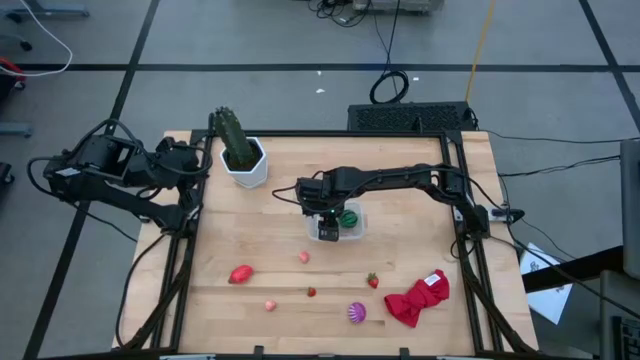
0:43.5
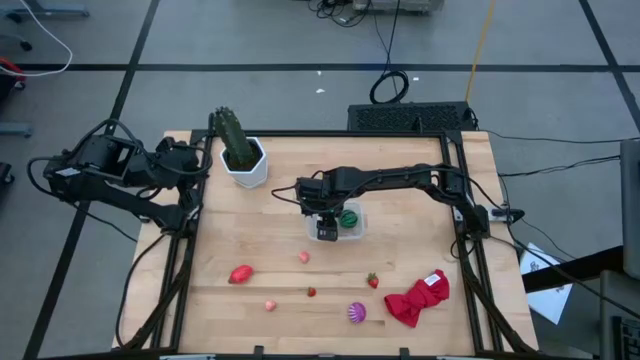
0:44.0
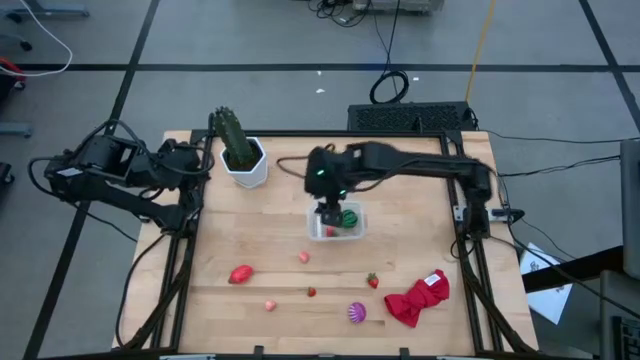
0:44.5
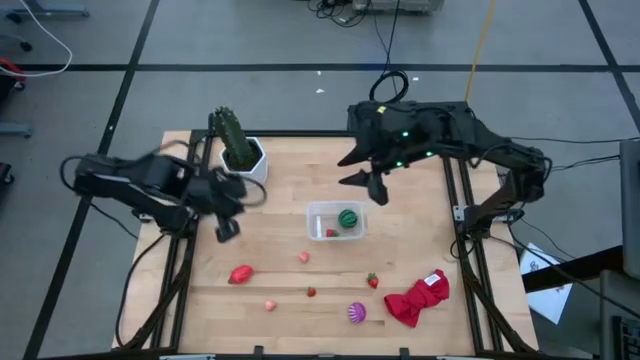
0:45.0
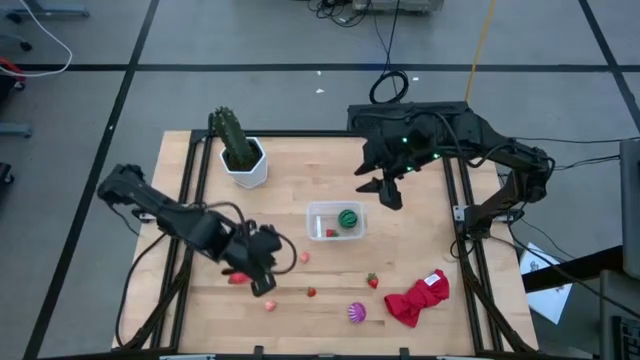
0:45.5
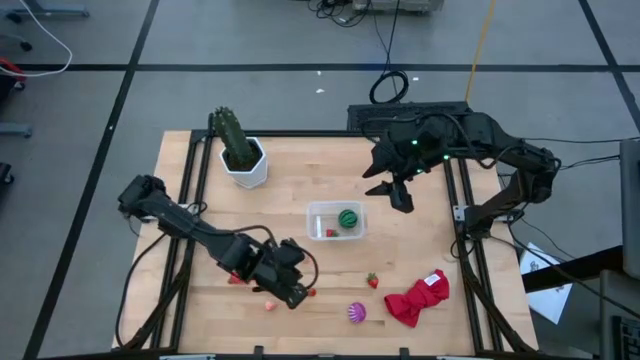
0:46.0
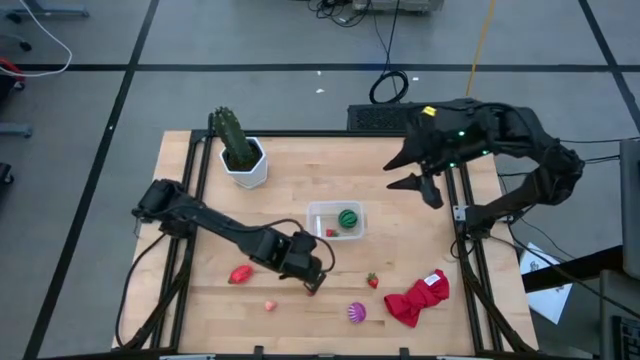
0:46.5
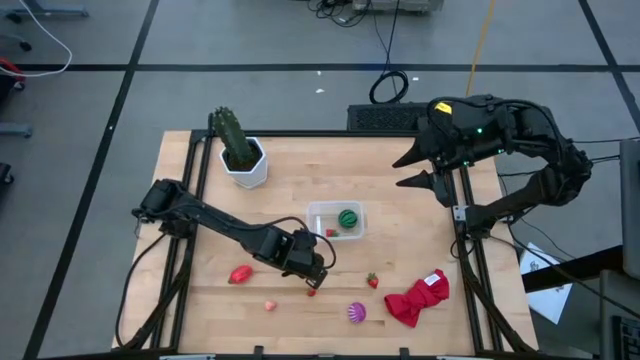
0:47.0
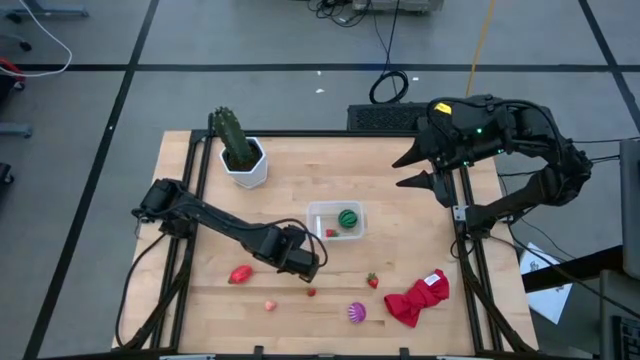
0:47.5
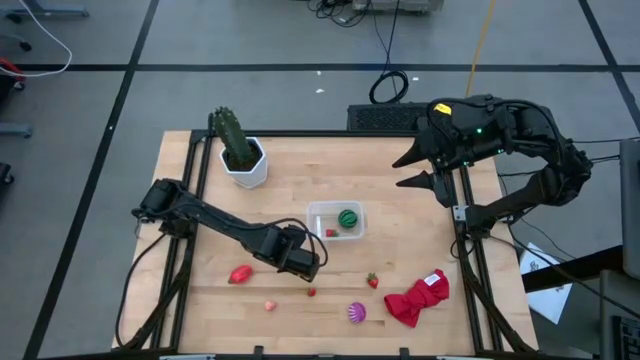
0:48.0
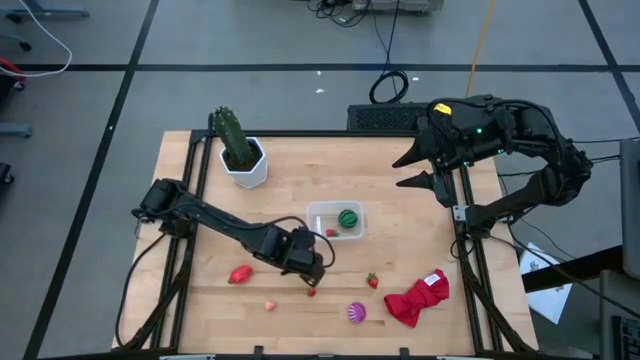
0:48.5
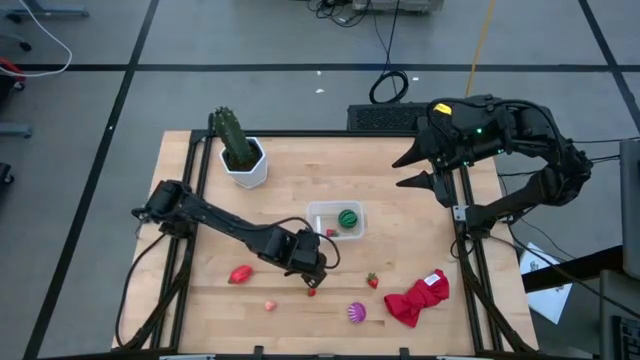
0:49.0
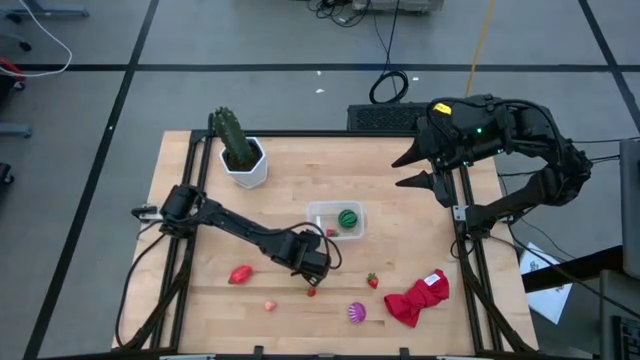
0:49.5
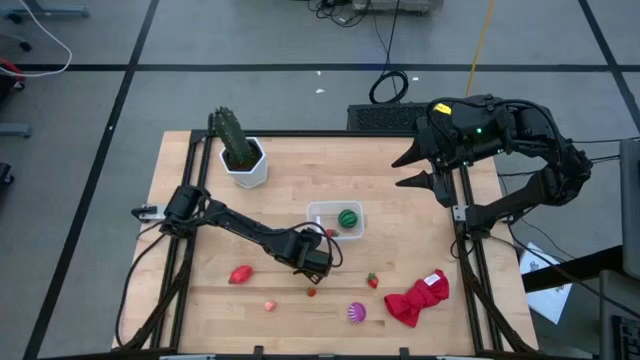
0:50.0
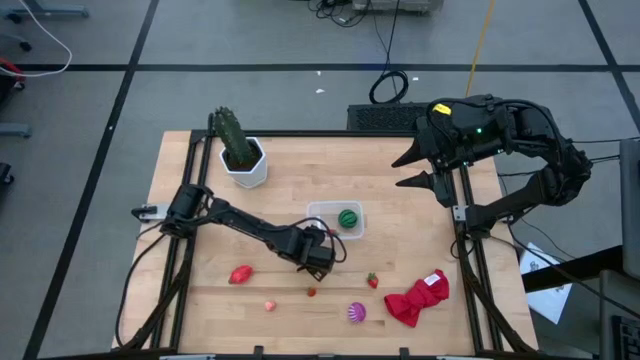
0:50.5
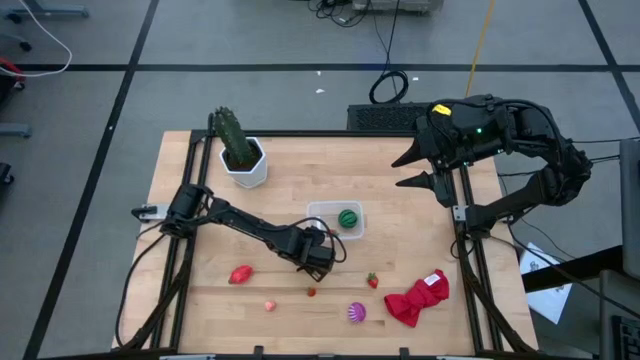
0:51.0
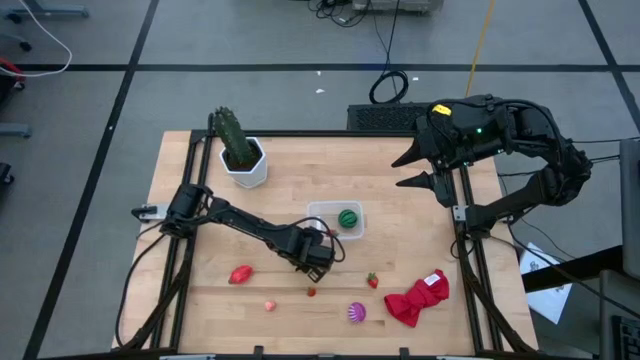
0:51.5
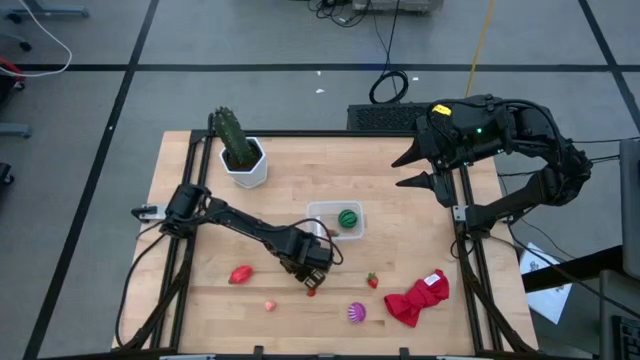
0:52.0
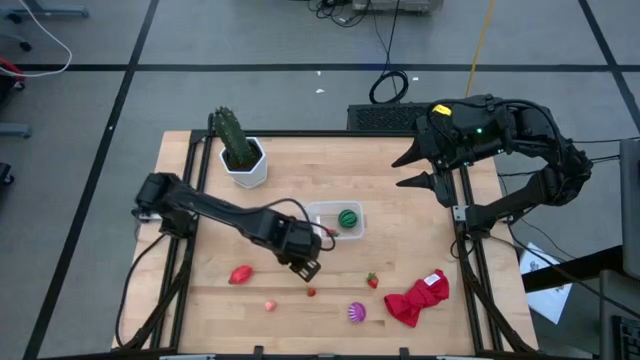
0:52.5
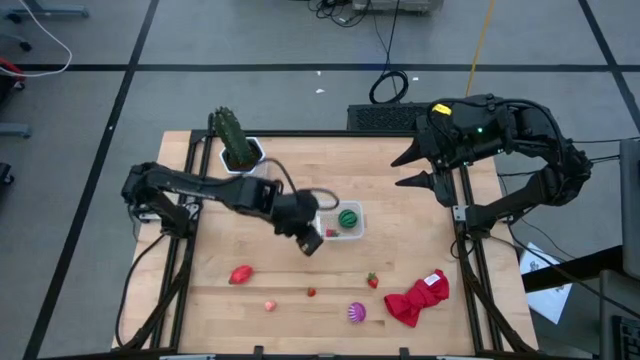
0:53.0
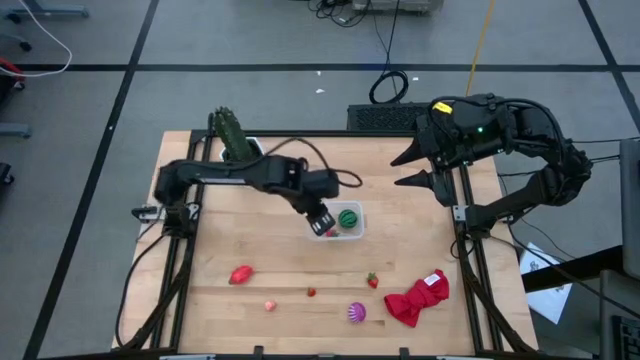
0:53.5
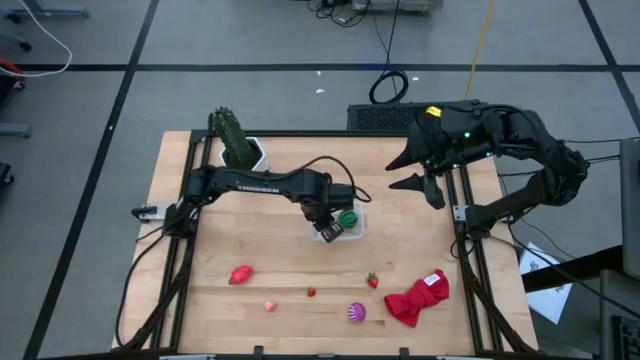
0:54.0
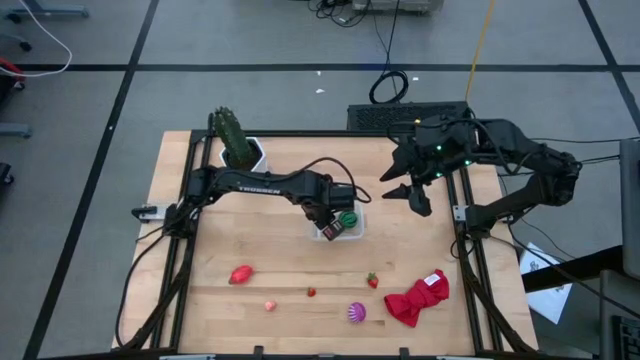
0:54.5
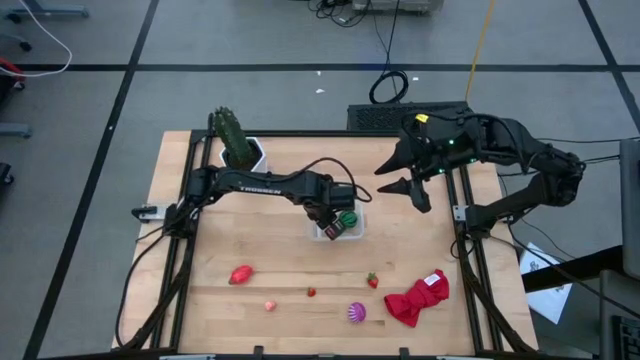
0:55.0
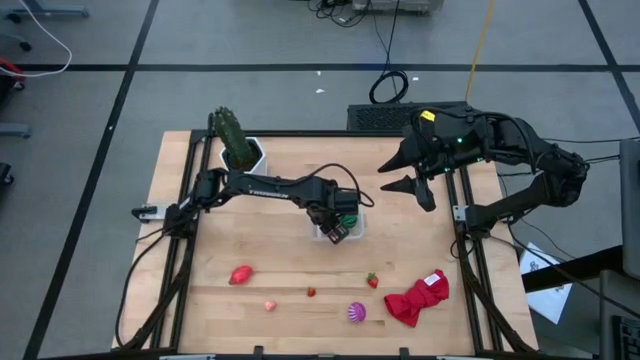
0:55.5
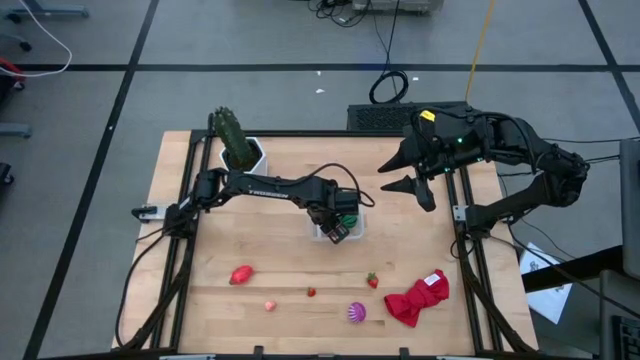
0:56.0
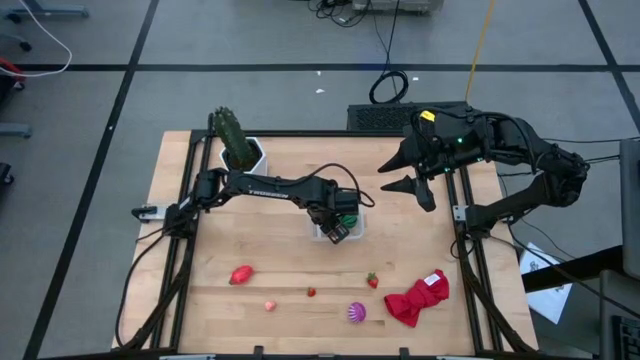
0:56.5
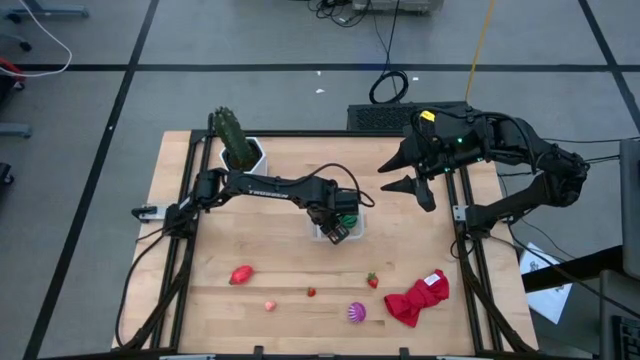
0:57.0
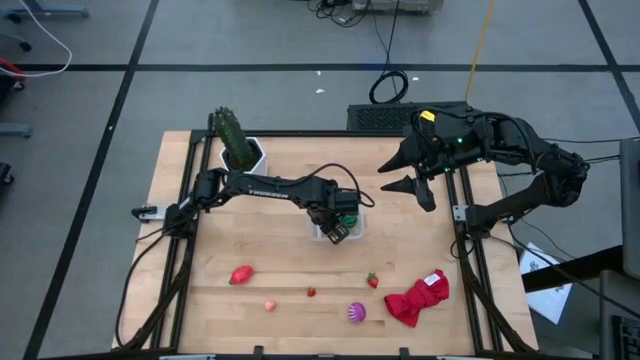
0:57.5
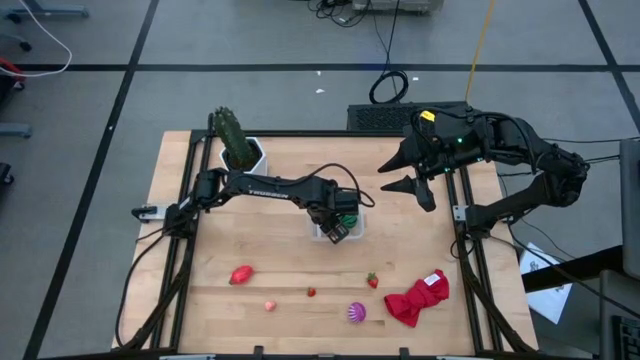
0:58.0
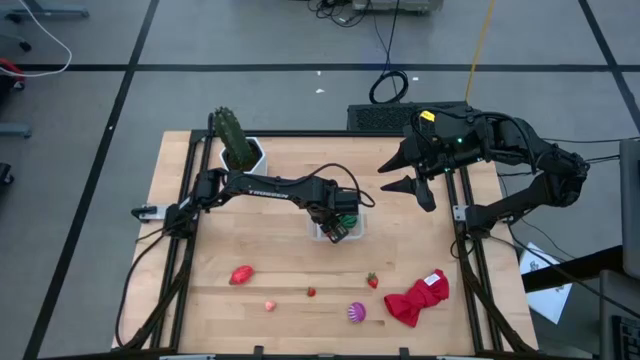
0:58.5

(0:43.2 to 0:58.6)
Task: Pick and placing Produce into tupperware
Put the top peach into the transparent bin

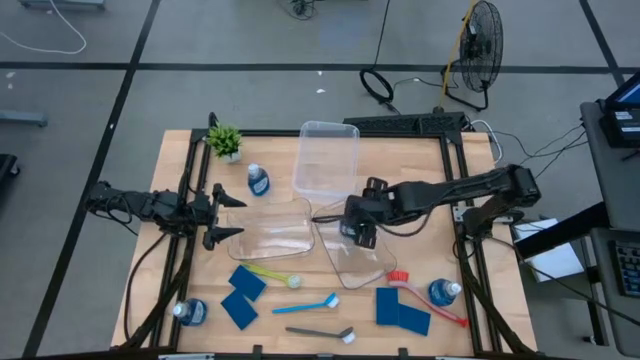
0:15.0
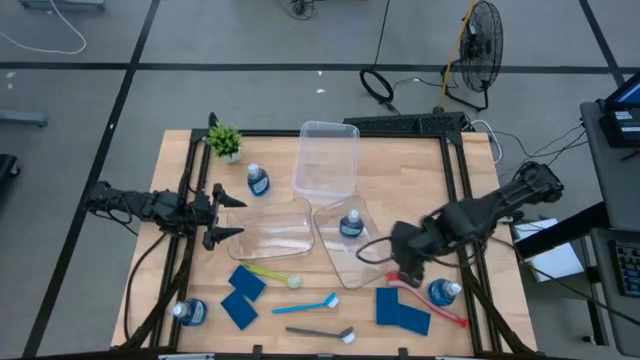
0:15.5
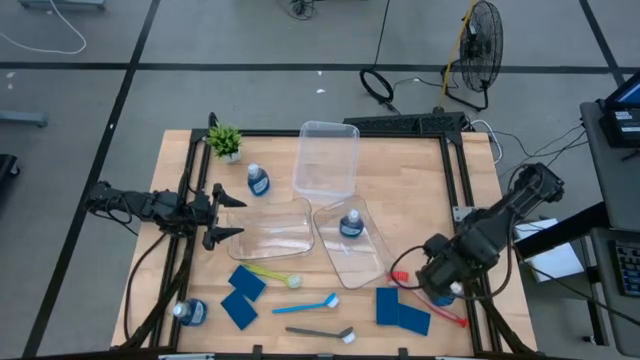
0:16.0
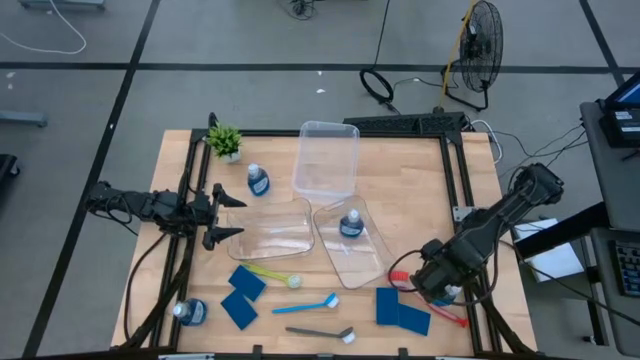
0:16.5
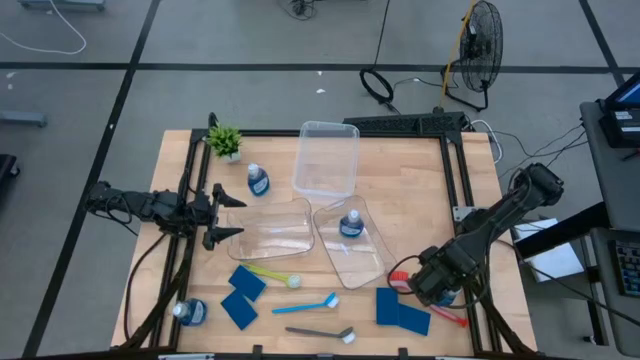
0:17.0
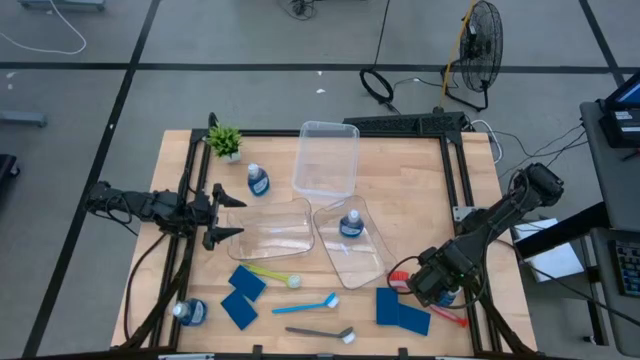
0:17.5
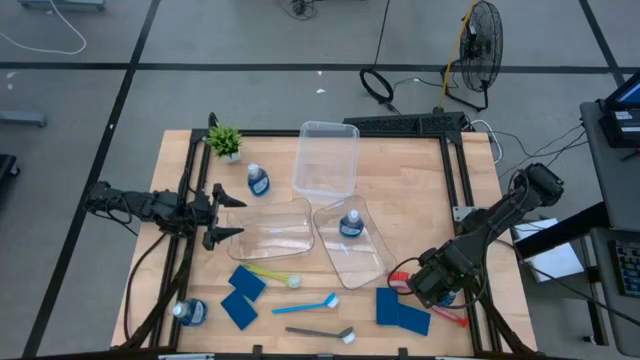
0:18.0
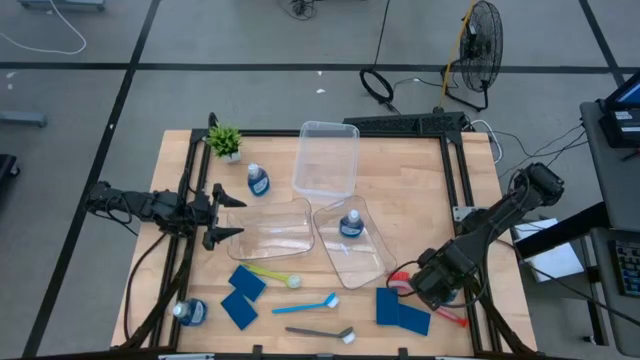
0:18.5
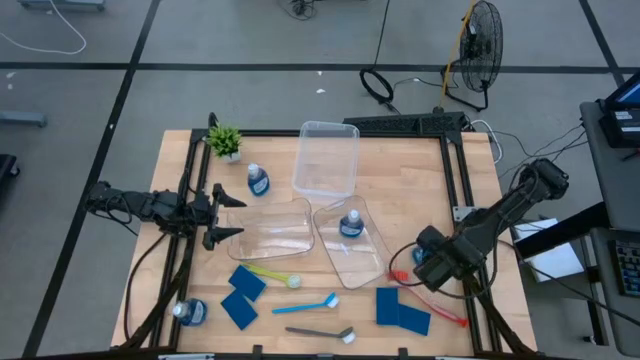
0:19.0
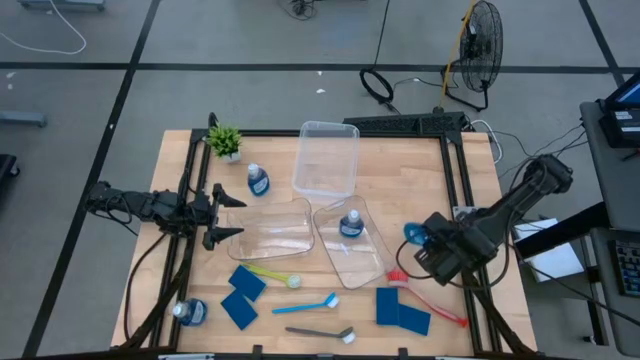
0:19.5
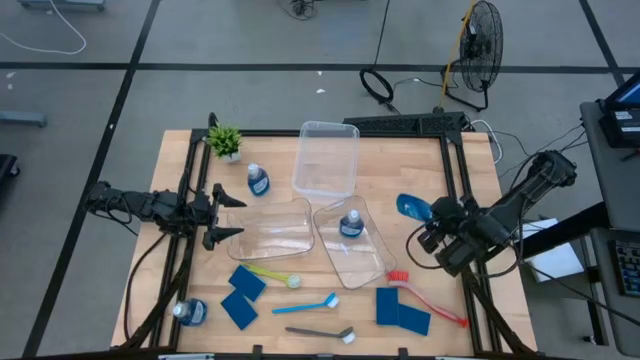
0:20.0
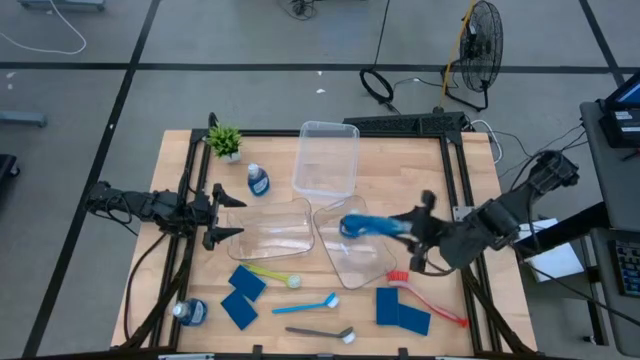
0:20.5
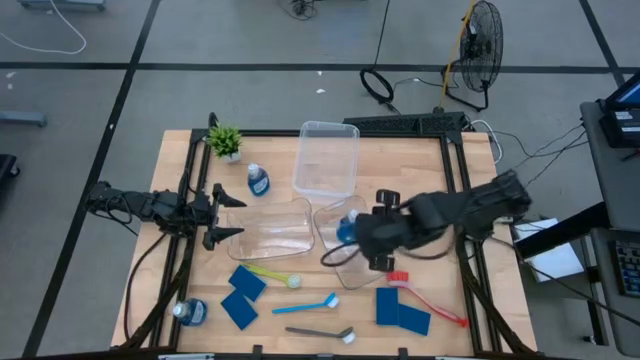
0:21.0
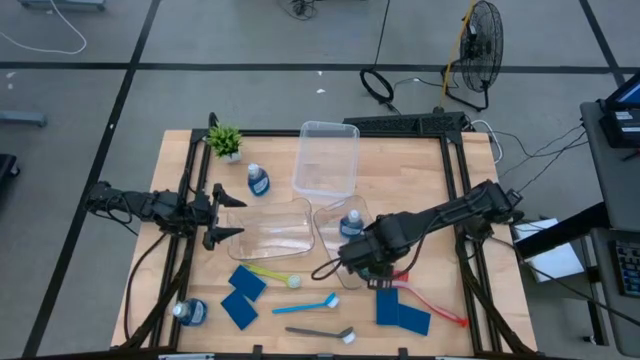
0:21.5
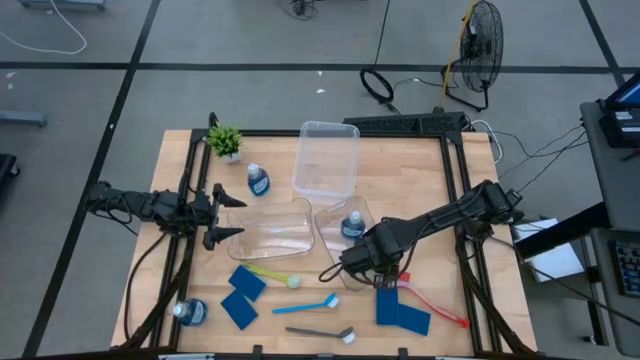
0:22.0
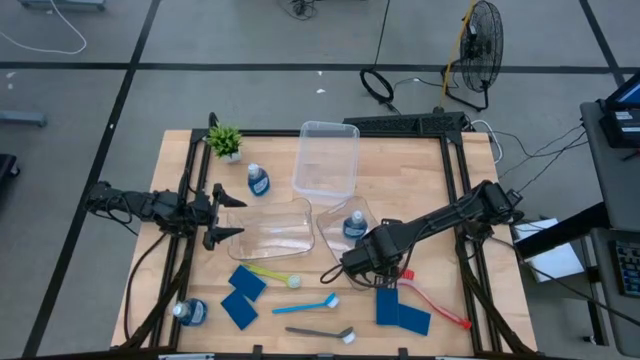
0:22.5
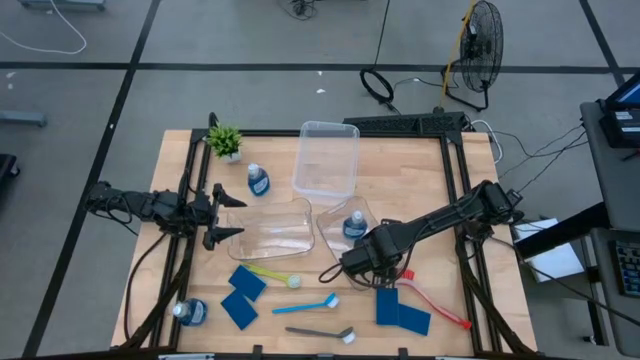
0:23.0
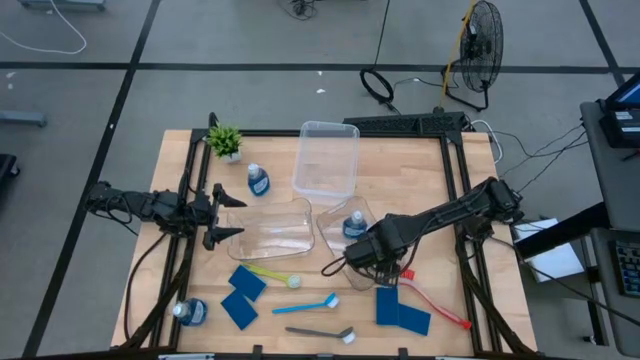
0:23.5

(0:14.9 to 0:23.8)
Task: Pick & Place Kitchen Sink Supplies
Put the blue soap dispenser into the right transparent bin
